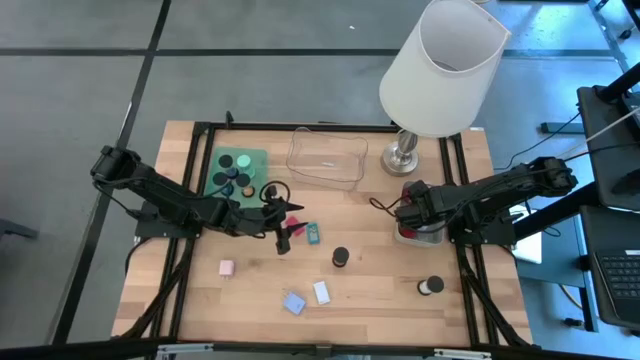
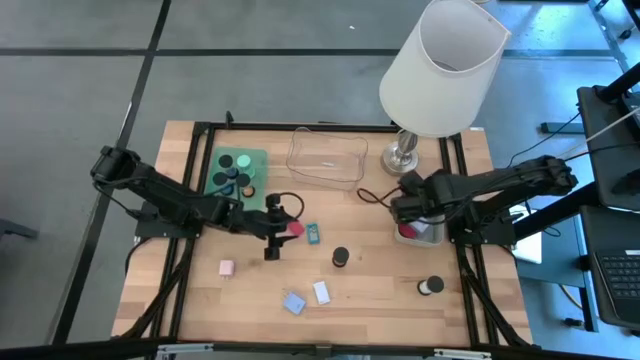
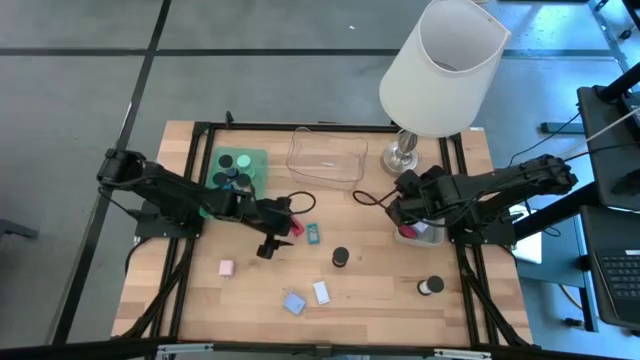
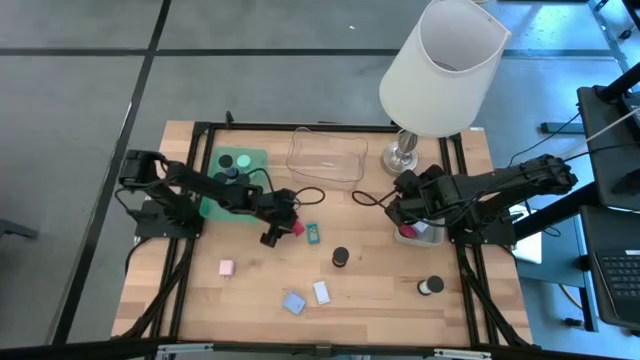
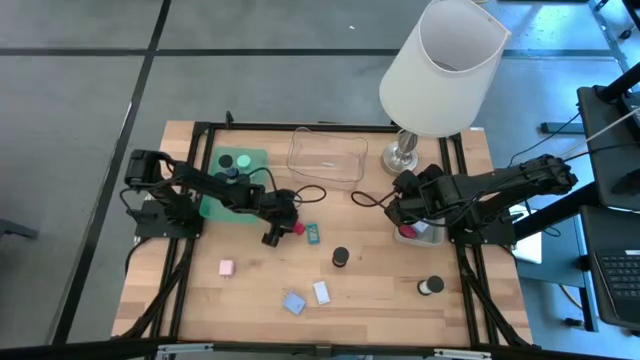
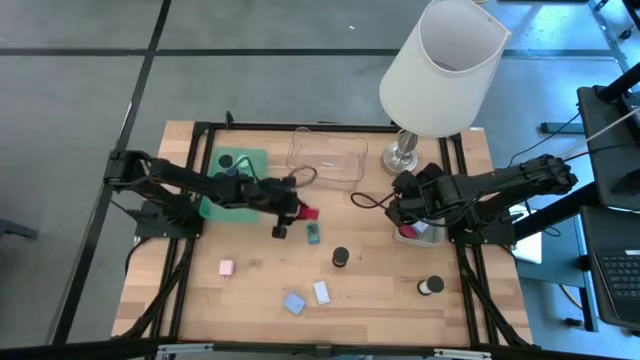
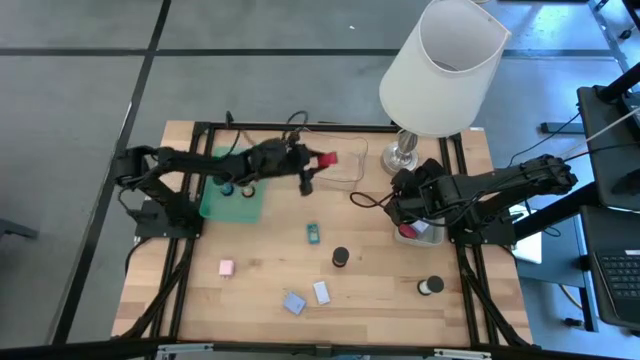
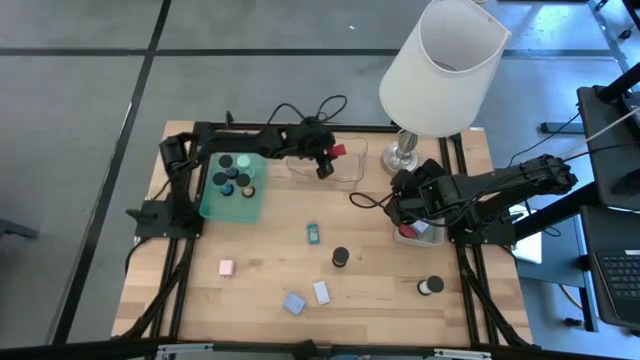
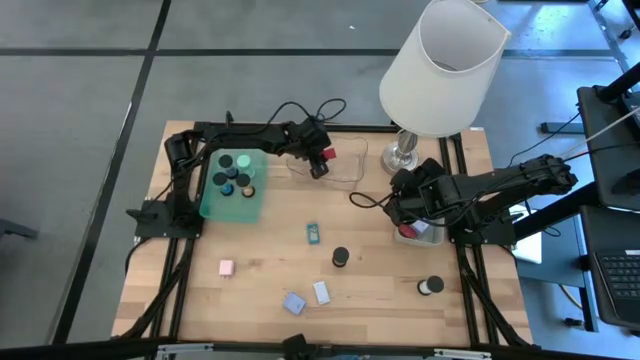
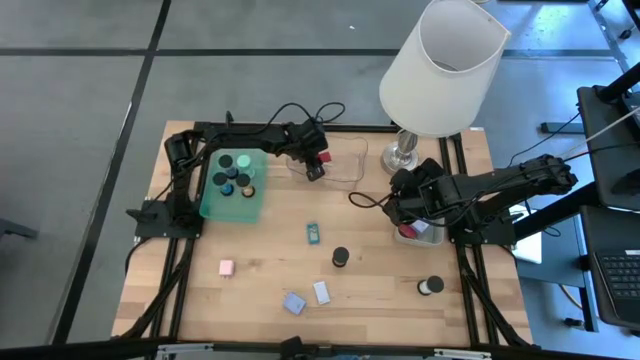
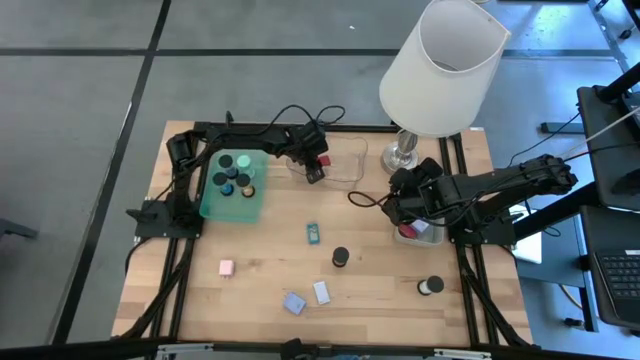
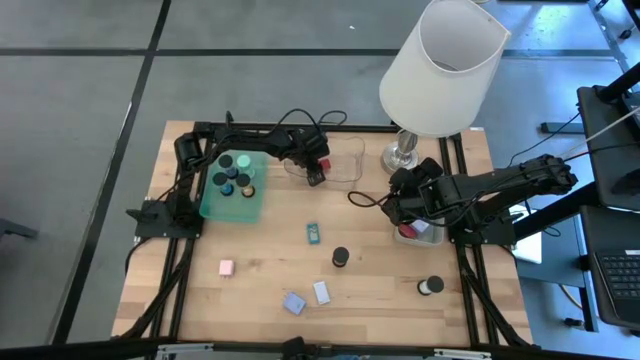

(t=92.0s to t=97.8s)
Task: Pick & Place Office items
Put the red digital clock into the transparent bin

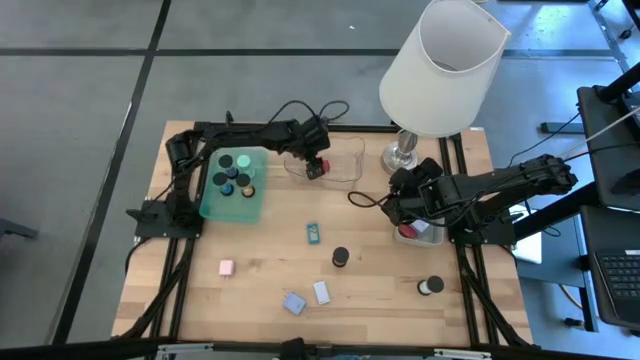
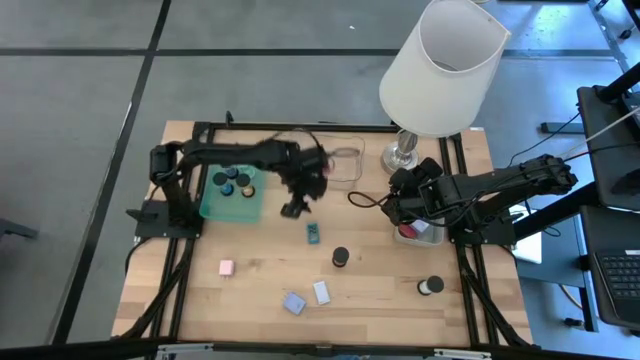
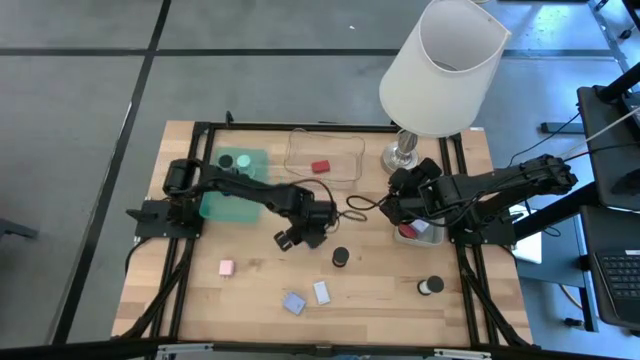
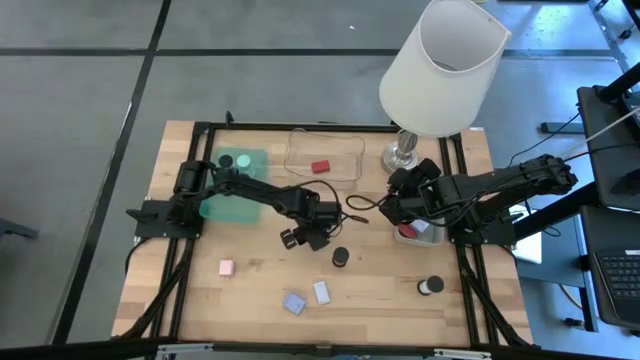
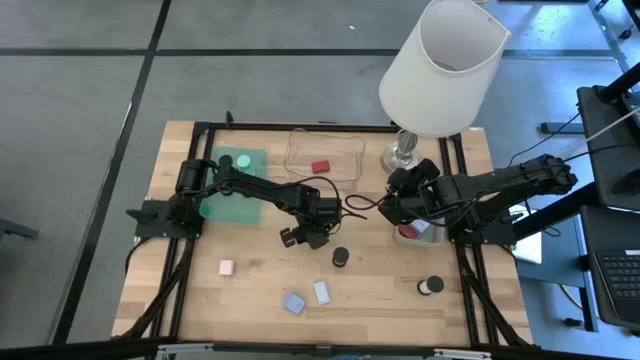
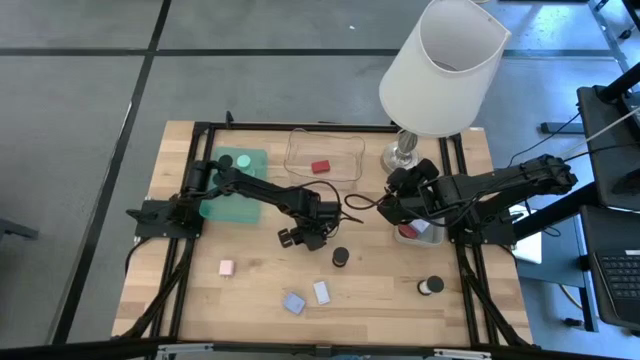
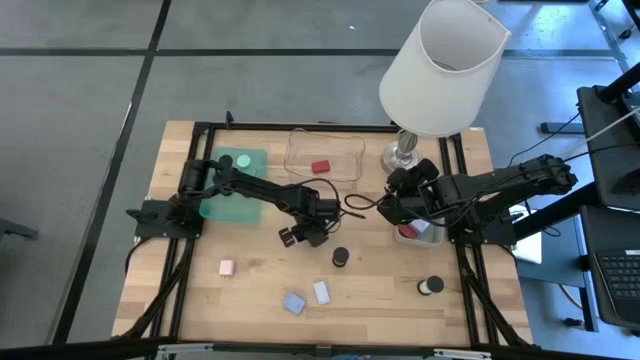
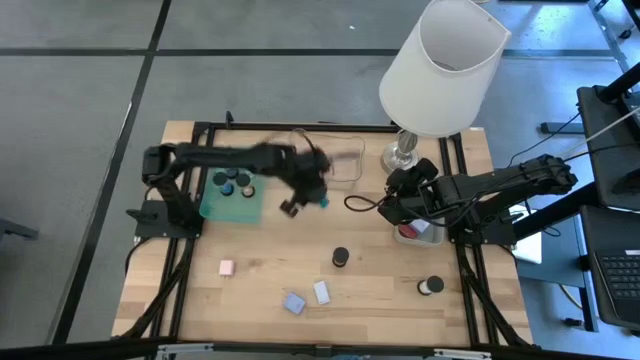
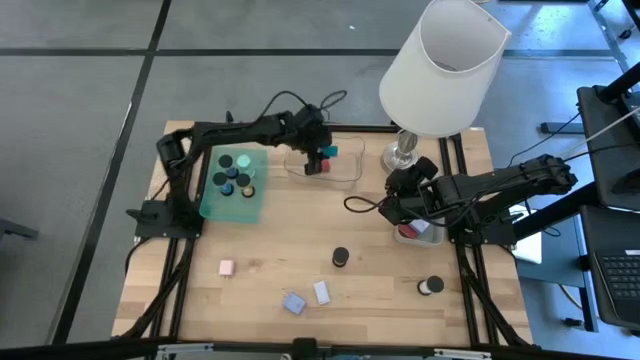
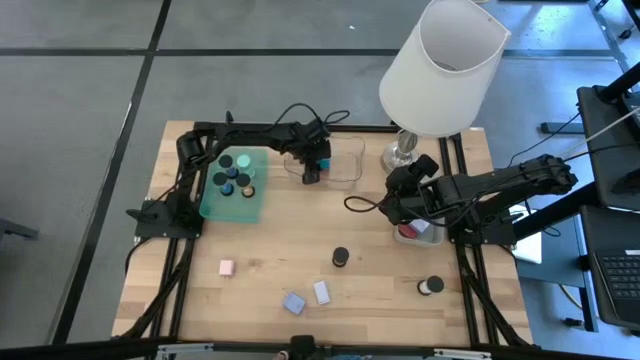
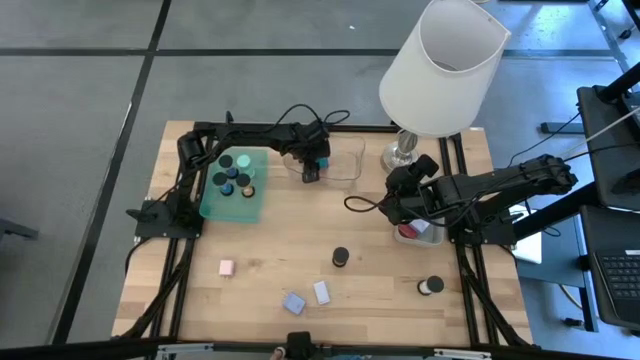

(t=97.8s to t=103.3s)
Put the light blue digital clock into the transparent bin

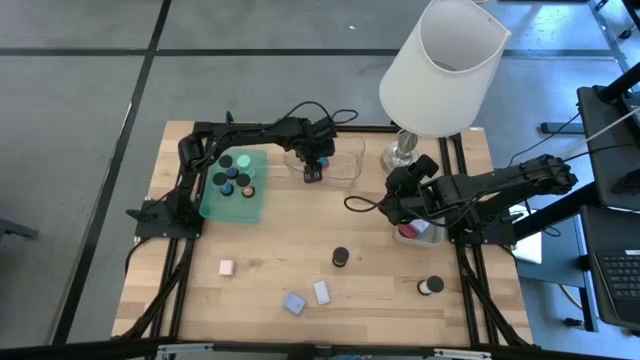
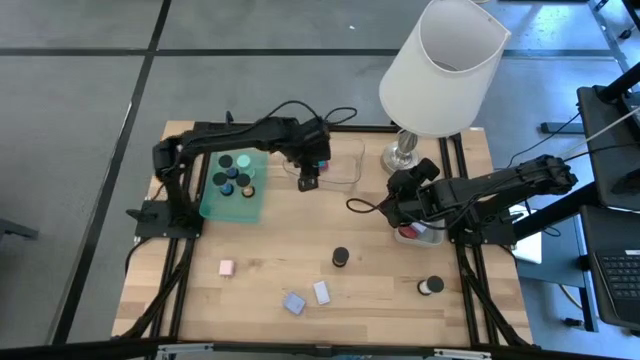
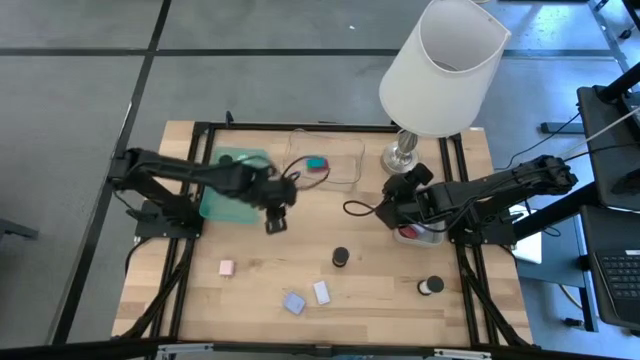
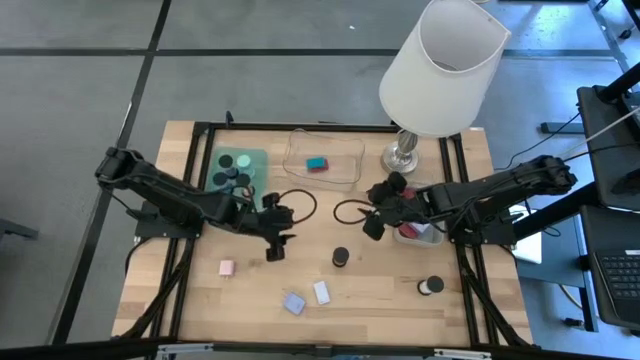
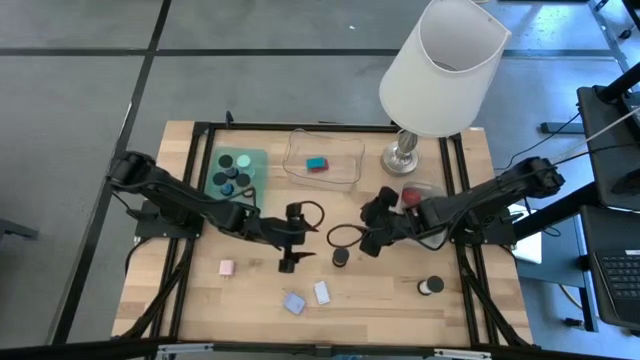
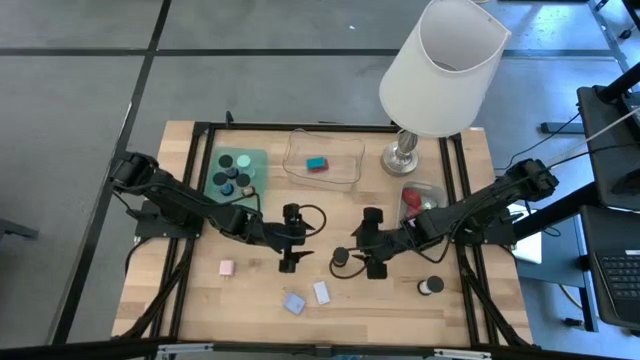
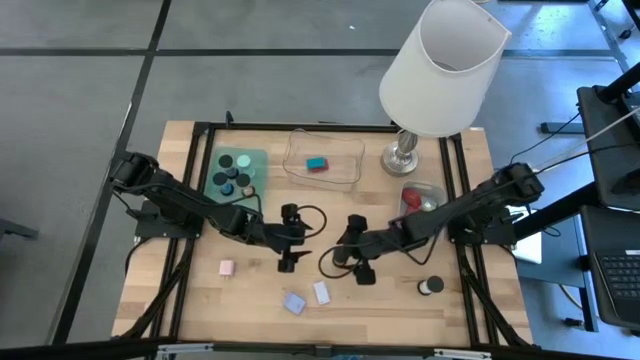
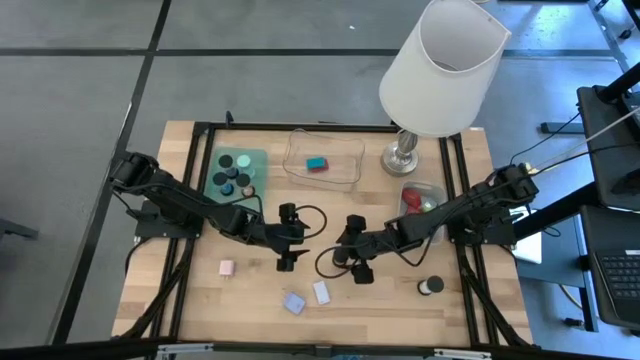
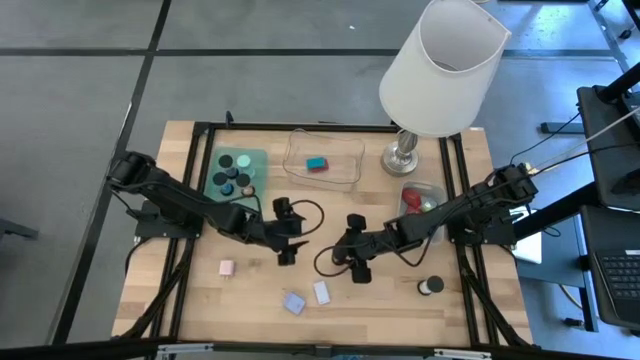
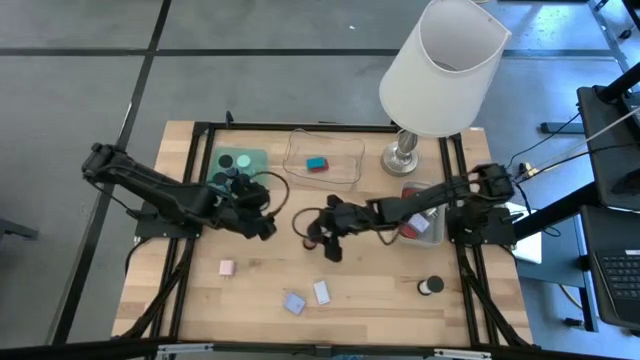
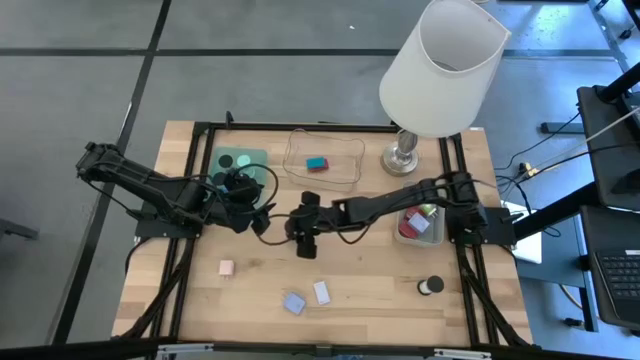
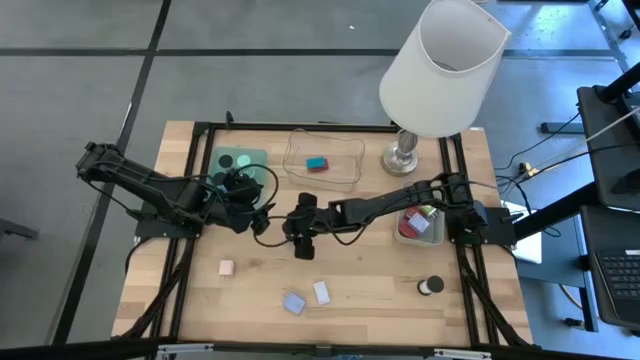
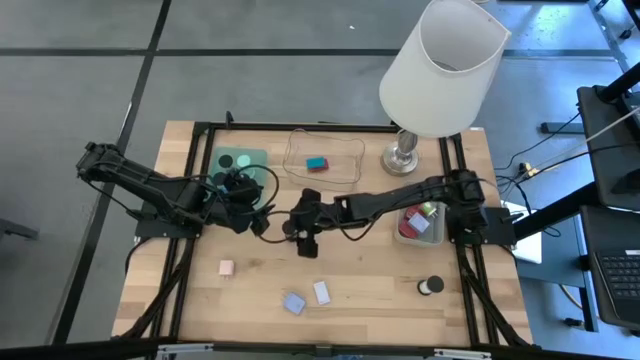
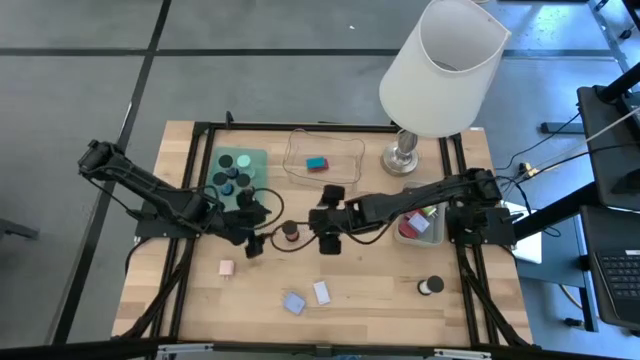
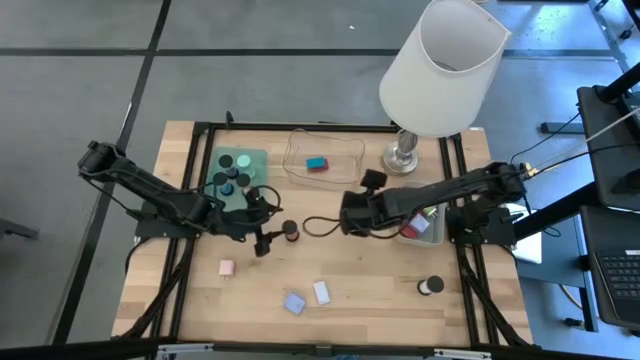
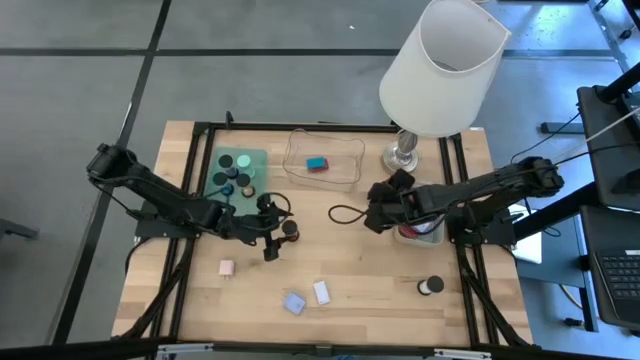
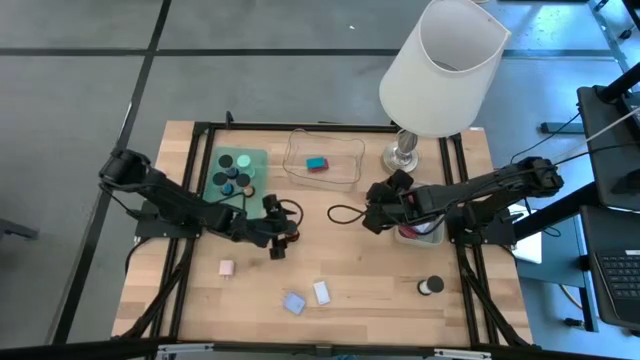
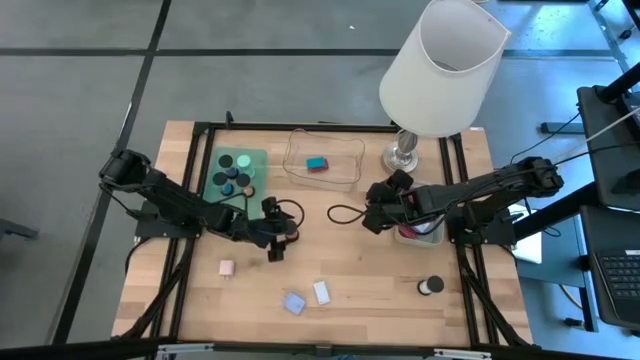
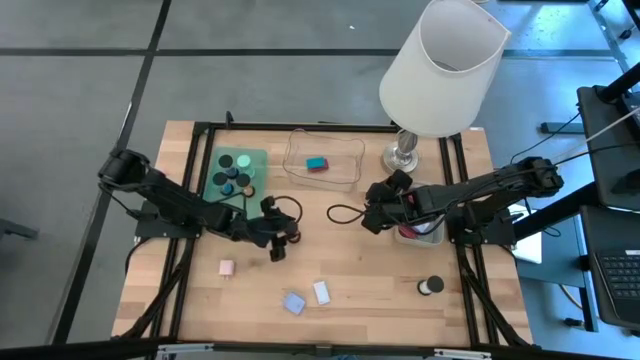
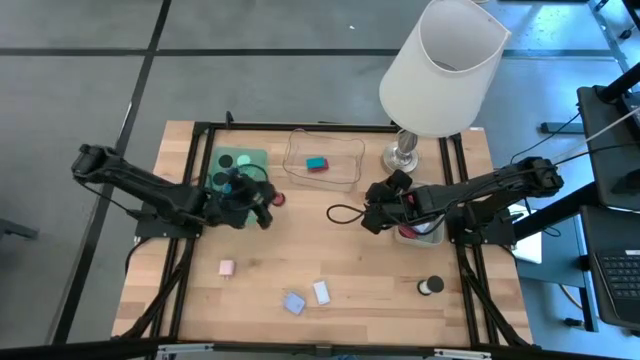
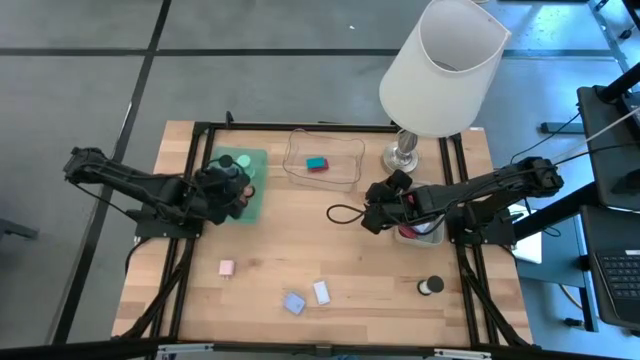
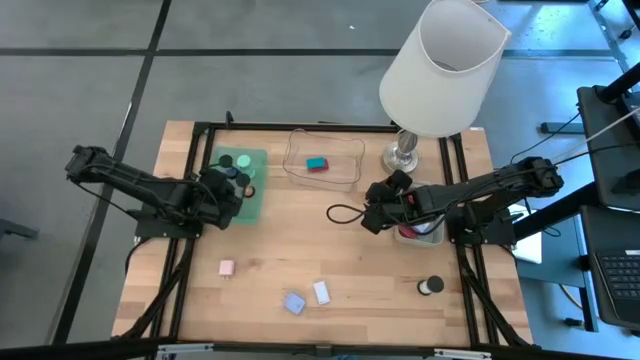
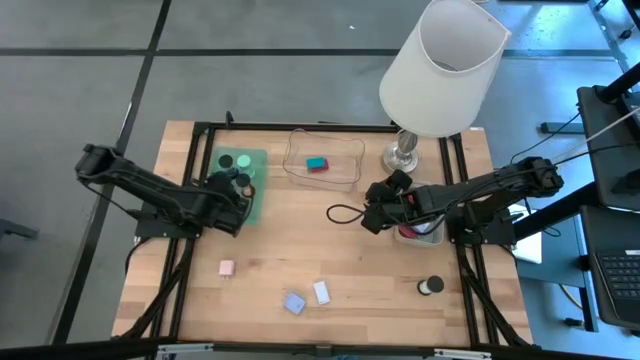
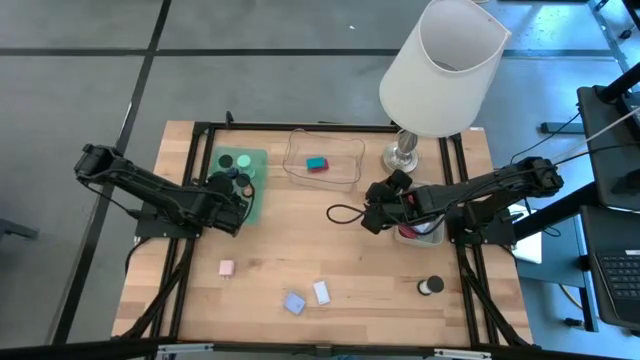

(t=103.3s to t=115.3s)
Put the red hourglass into the blue bin
